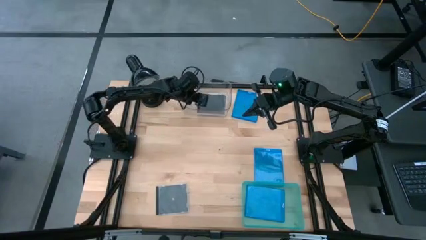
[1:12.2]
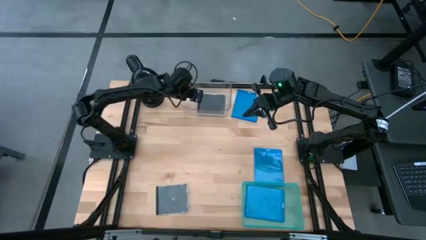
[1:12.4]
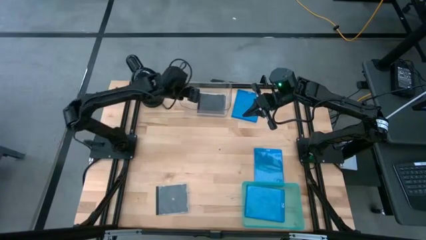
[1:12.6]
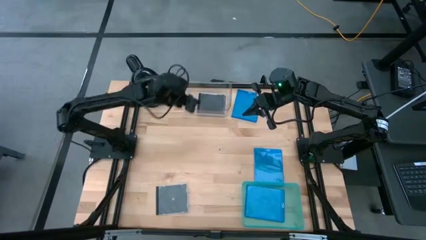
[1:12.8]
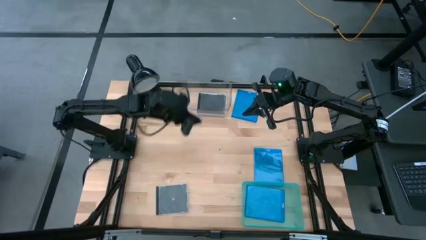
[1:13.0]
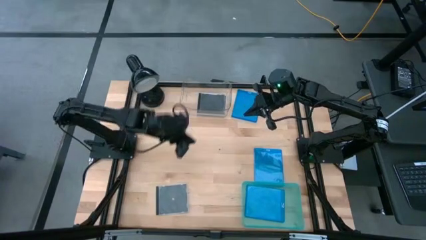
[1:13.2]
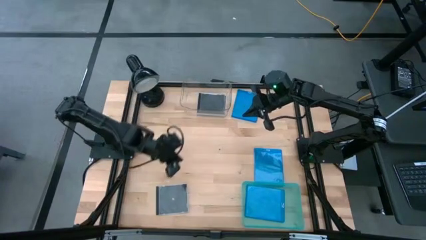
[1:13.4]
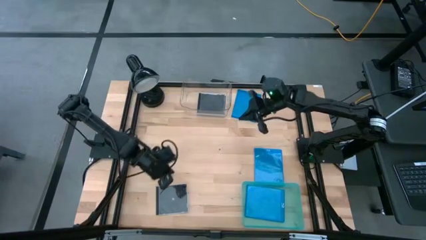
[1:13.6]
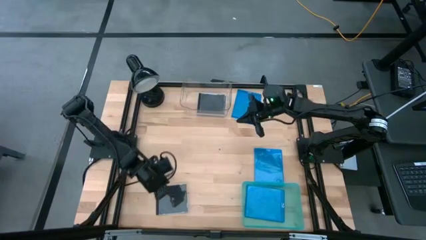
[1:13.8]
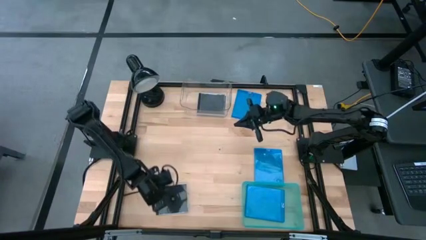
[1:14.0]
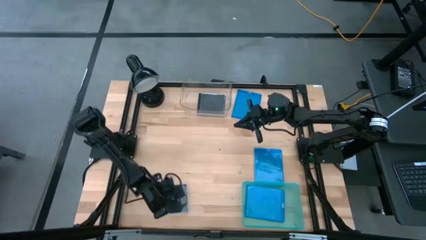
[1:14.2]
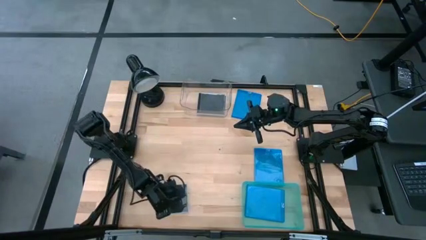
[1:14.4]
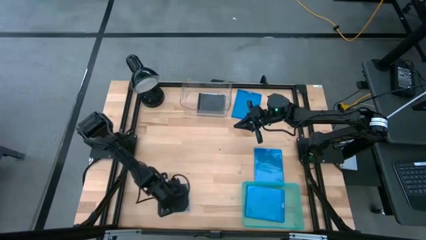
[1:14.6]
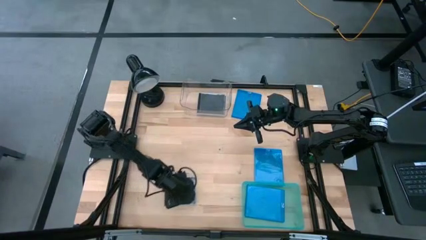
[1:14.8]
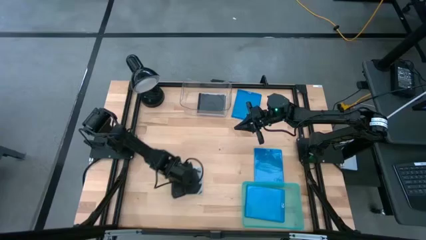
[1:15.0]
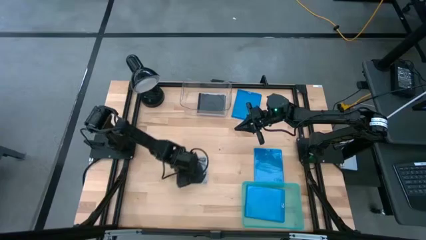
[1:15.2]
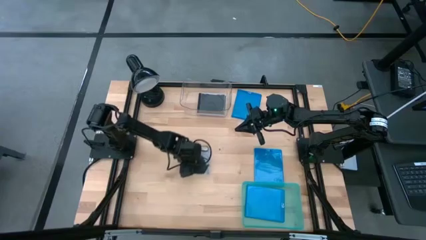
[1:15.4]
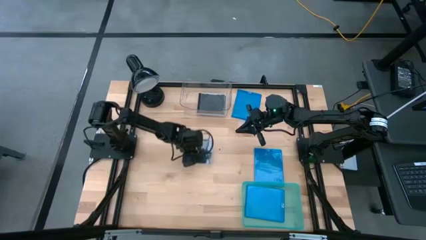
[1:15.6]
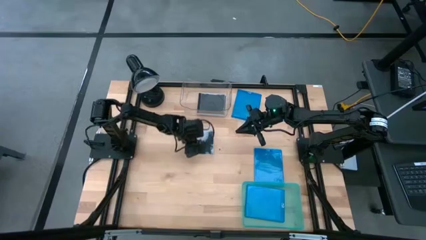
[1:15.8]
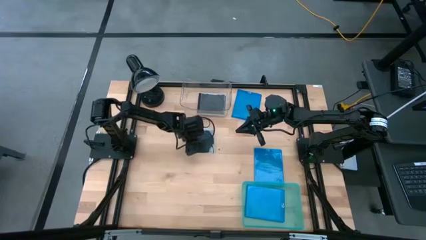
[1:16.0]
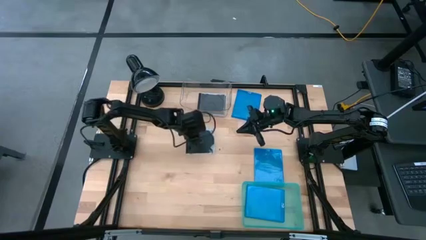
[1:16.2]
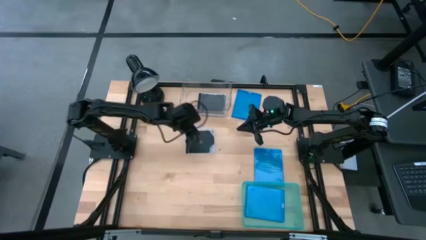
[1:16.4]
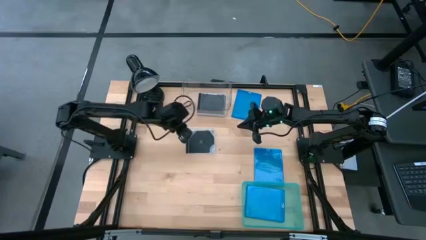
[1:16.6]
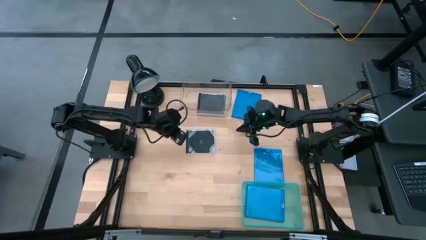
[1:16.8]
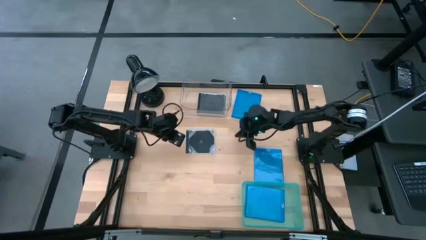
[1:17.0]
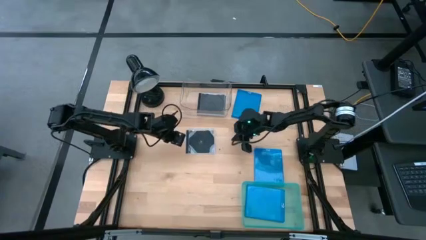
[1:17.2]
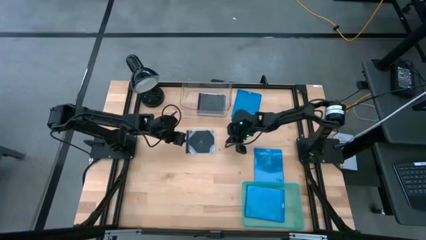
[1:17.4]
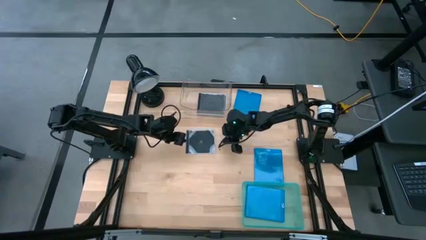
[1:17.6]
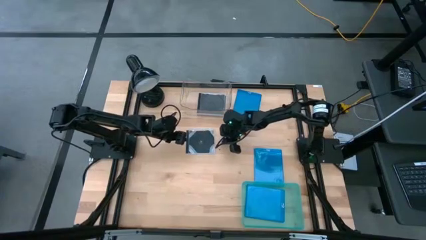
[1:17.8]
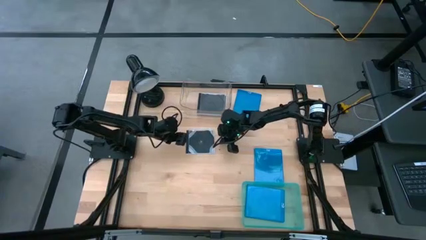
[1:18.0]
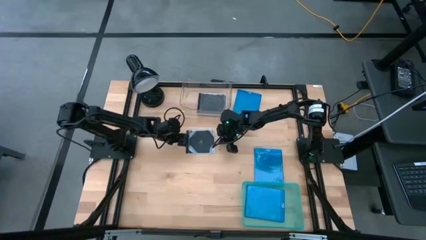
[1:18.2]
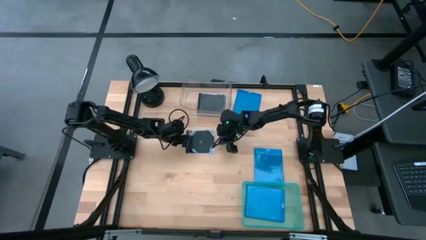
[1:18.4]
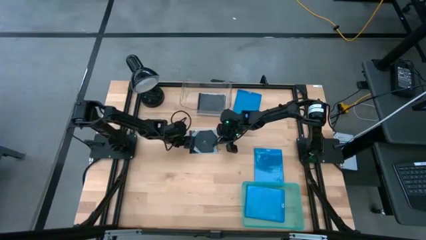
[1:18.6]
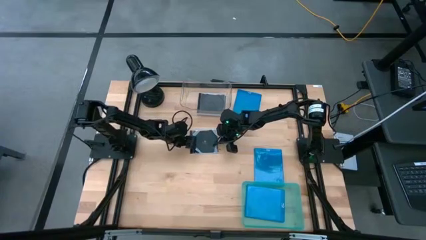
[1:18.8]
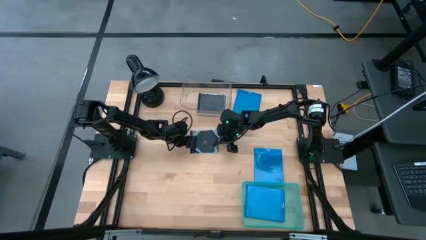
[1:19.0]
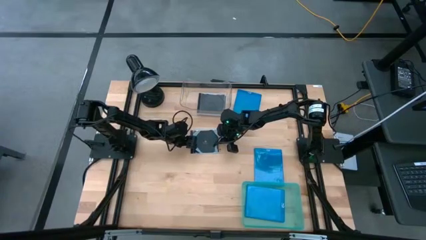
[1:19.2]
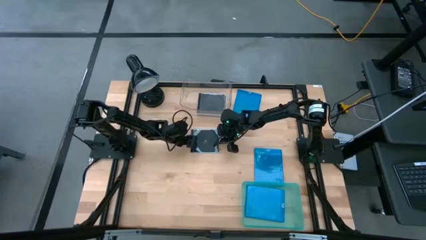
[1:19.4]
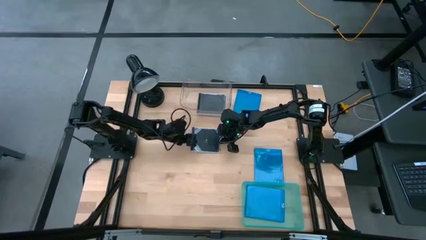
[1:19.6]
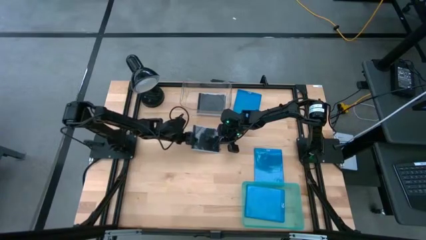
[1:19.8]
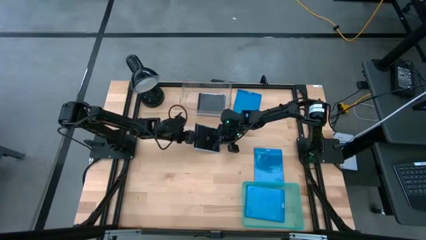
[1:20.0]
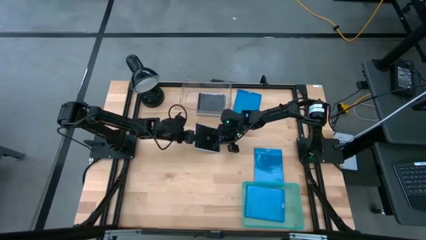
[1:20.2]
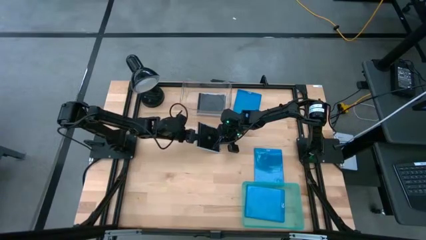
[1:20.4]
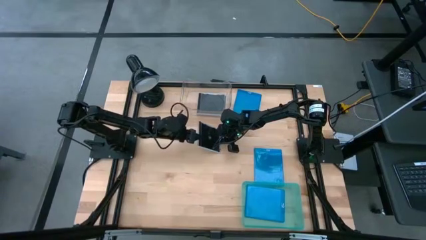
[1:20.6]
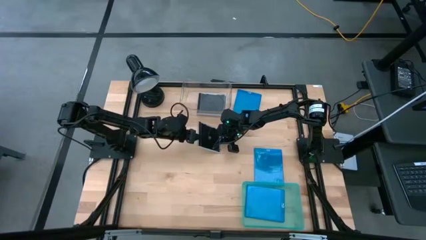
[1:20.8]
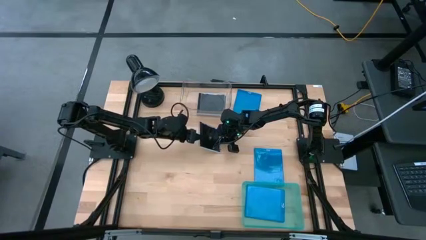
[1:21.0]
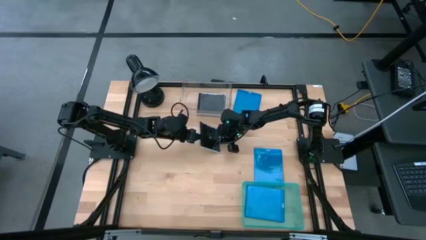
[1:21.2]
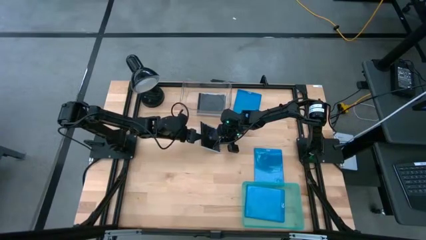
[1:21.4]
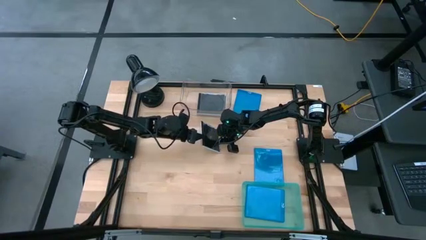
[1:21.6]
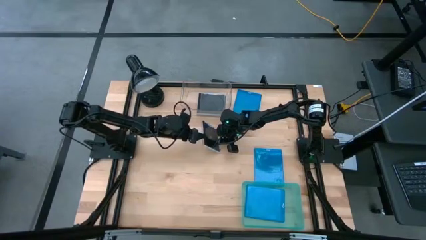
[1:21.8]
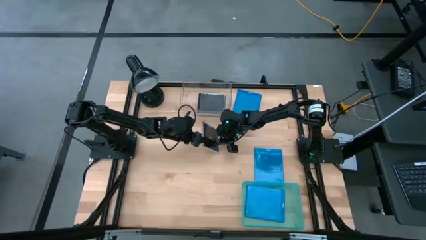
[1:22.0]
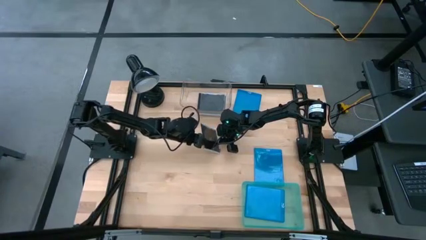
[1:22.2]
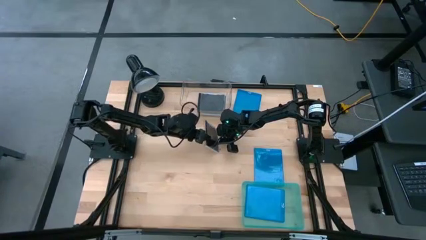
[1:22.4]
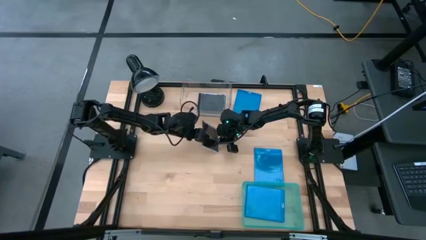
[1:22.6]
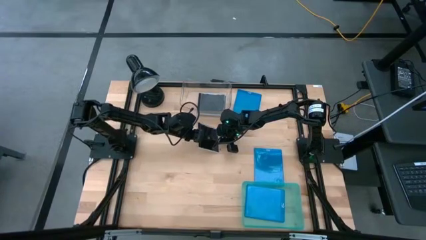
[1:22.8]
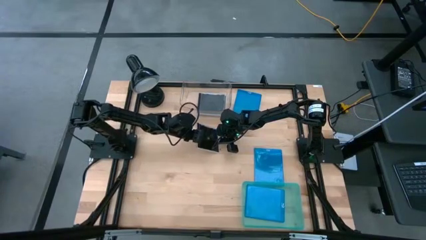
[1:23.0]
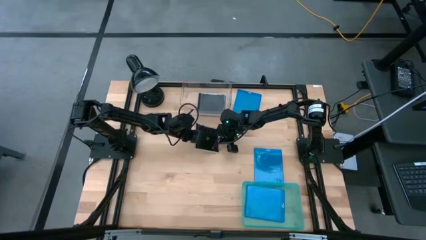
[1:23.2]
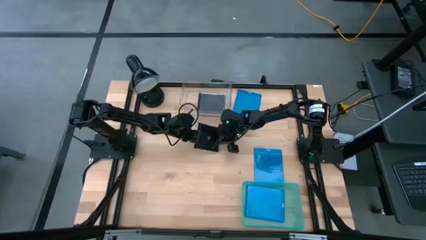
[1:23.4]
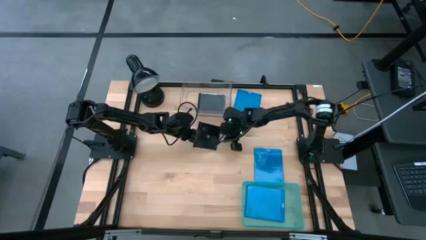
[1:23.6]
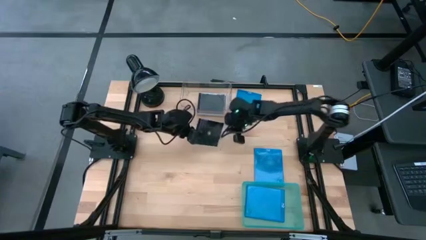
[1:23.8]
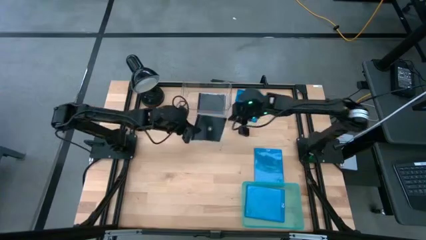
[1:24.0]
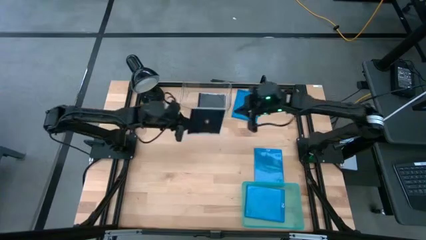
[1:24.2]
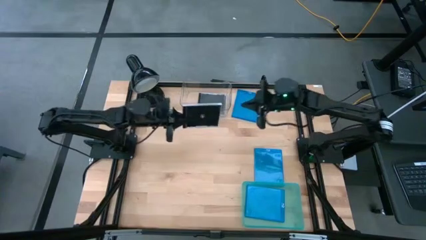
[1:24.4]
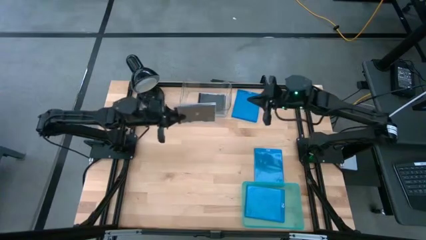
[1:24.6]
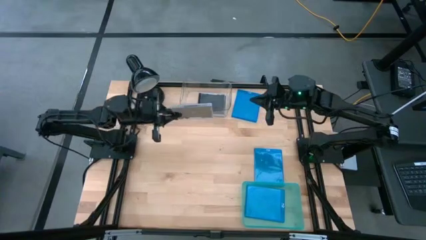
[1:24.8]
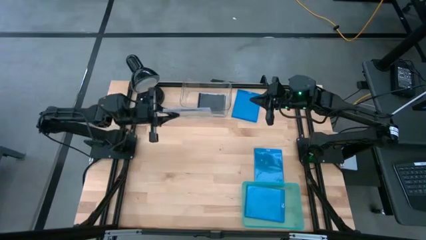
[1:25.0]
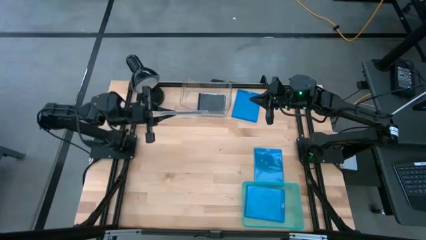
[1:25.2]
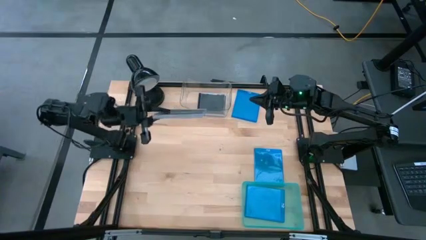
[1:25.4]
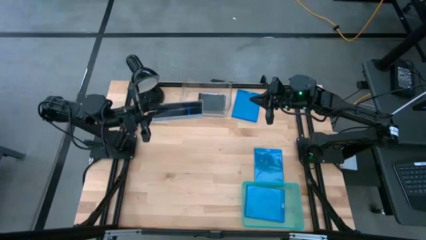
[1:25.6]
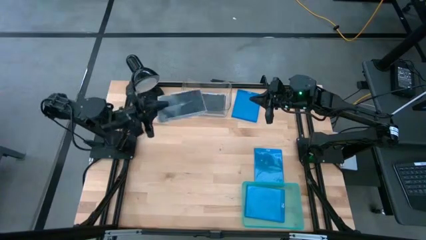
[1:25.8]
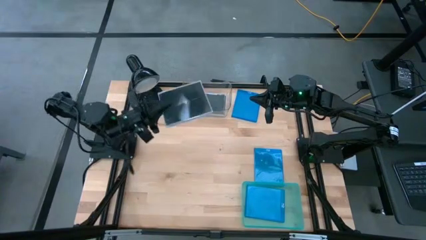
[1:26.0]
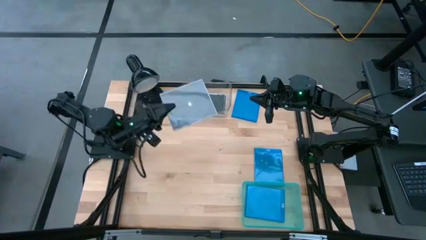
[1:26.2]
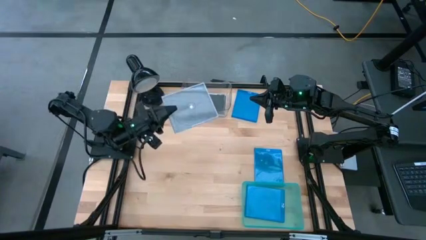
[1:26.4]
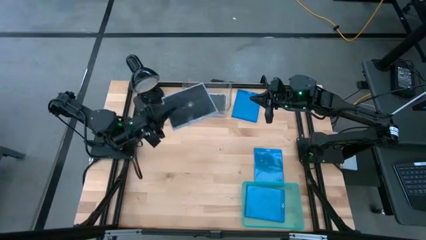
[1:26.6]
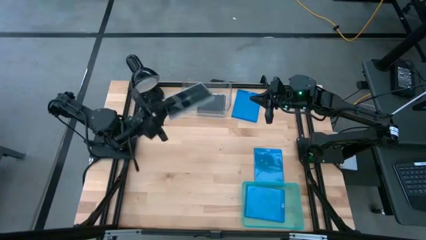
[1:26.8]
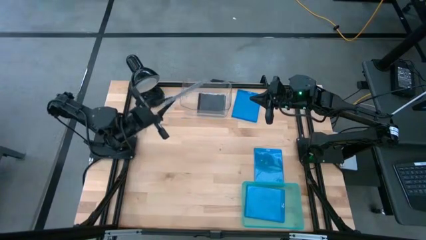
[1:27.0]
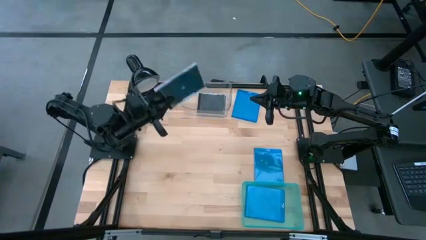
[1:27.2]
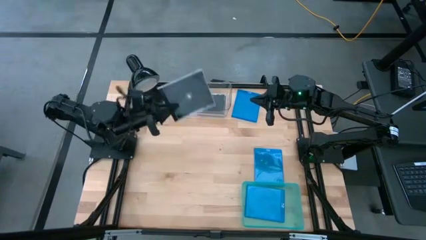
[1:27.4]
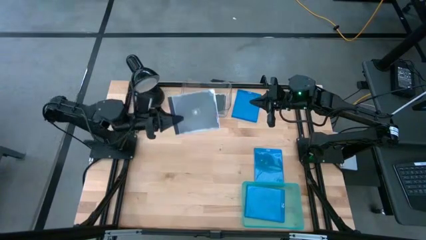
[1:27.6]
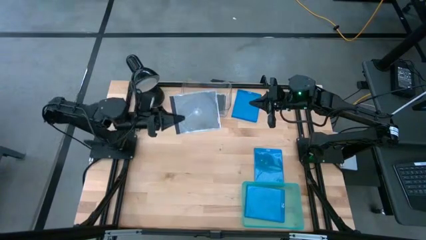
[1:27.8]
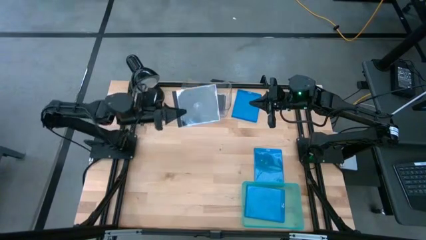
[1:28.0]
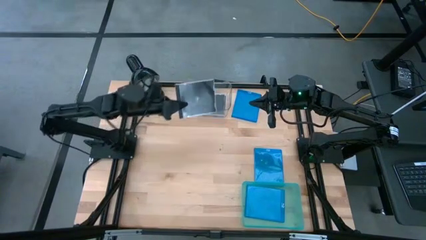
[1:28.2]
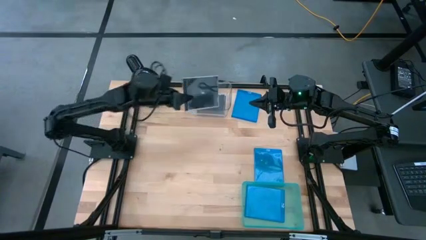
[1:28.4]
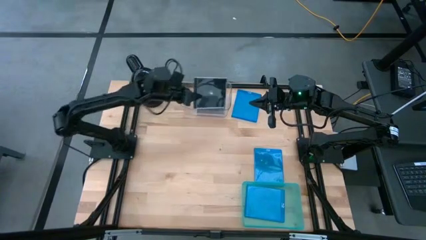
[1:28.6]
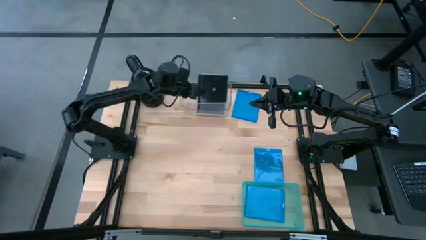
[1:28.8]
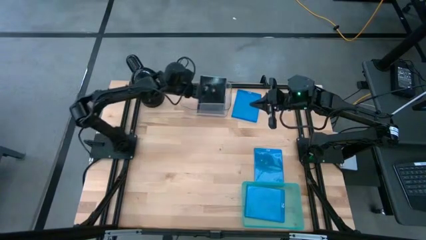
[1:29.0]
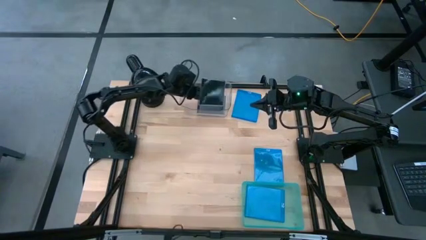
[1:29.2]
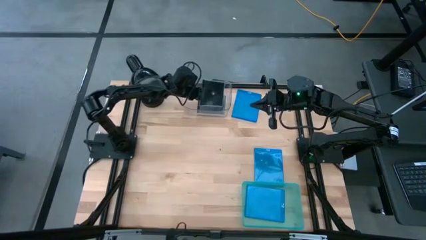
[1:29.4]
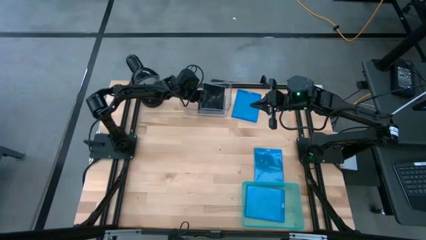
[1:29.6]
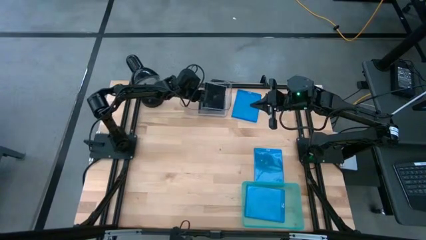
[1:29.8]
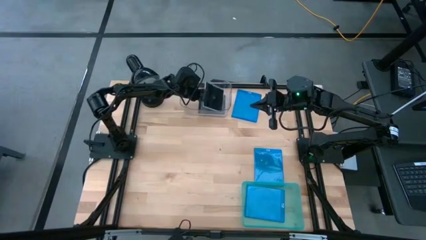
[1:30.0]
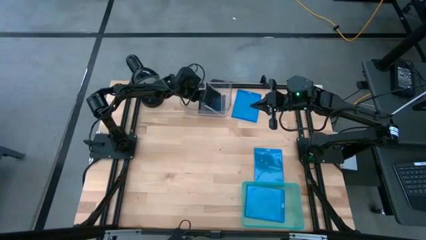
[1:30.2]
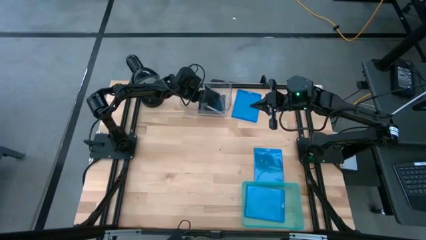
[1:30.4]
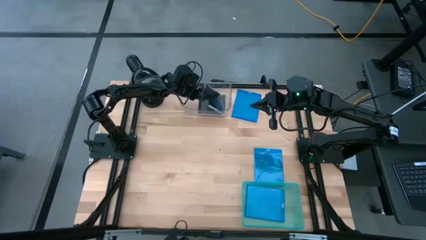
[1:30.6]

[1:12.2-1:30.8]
Task: Pick & place jewel cases by type
Put the black cd case into the transparent bin
